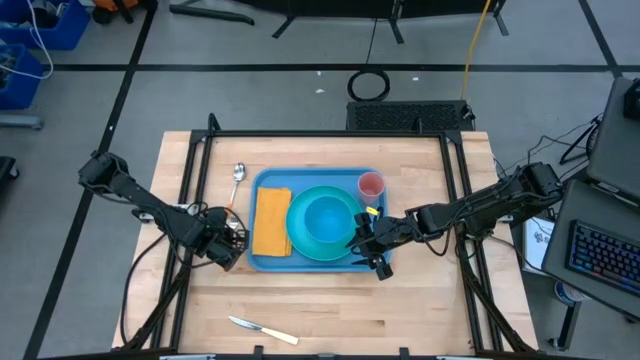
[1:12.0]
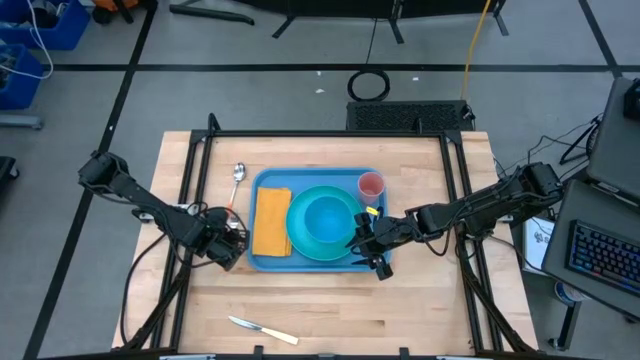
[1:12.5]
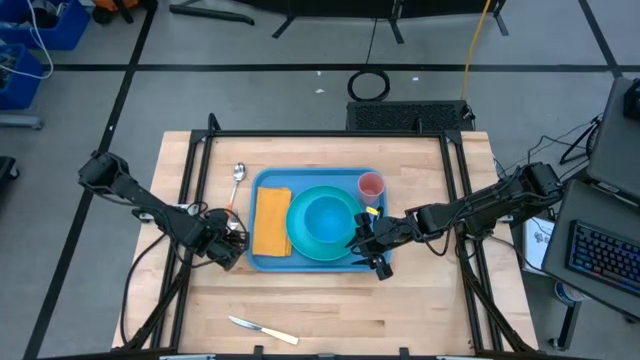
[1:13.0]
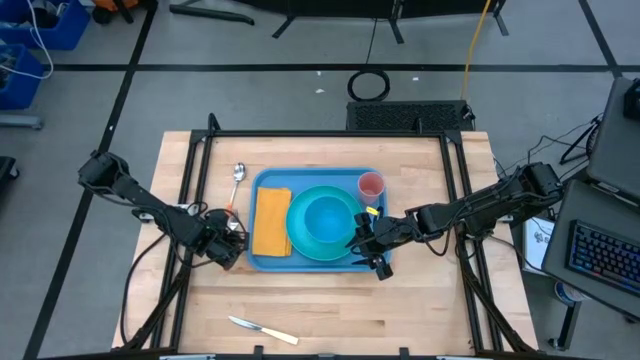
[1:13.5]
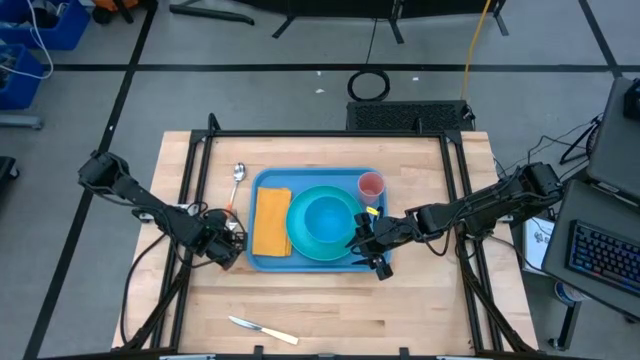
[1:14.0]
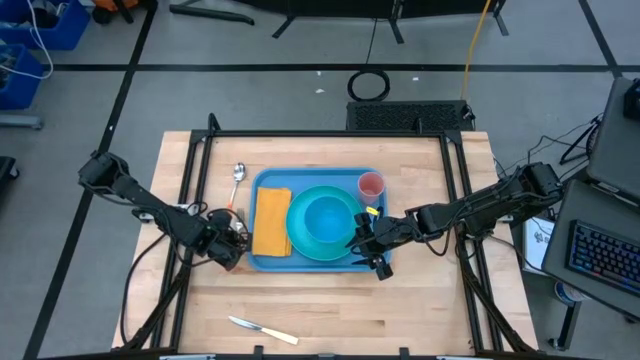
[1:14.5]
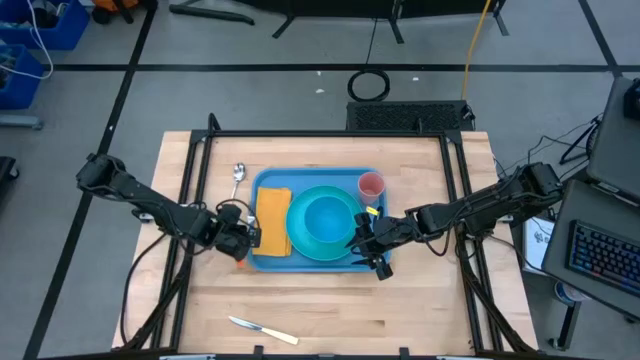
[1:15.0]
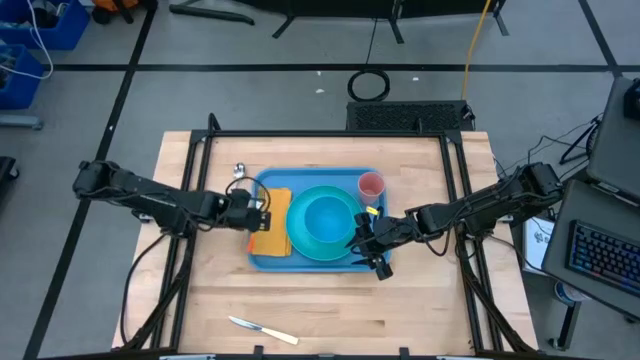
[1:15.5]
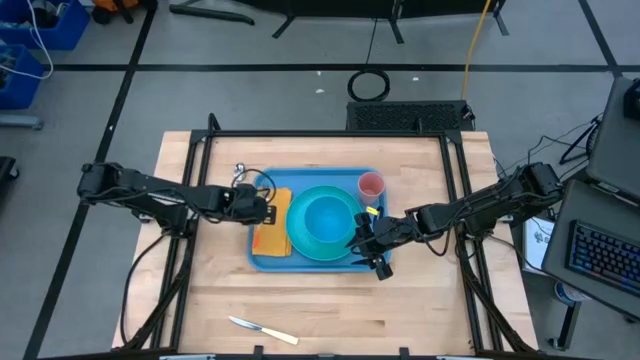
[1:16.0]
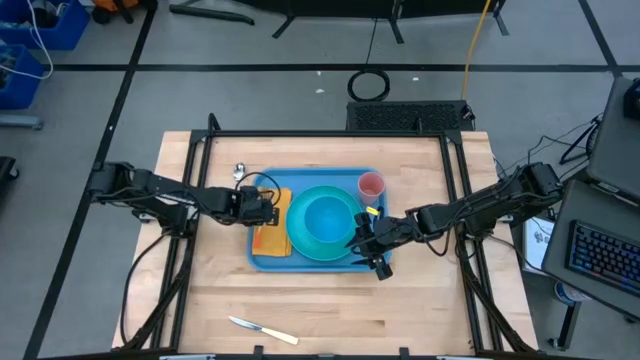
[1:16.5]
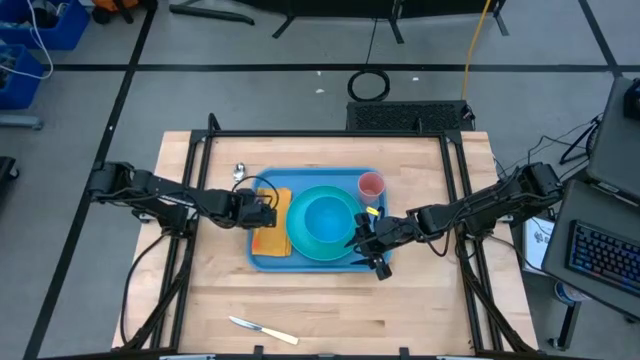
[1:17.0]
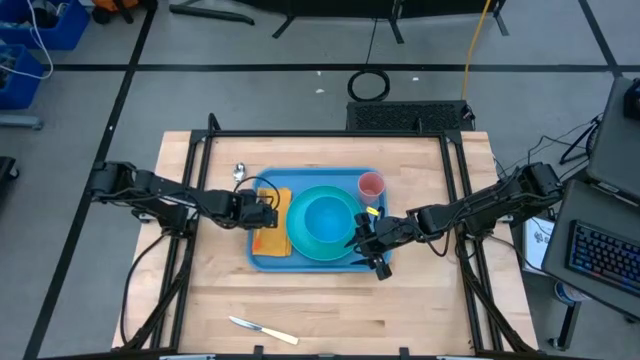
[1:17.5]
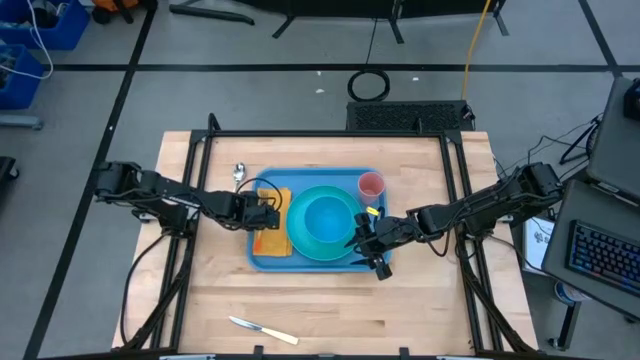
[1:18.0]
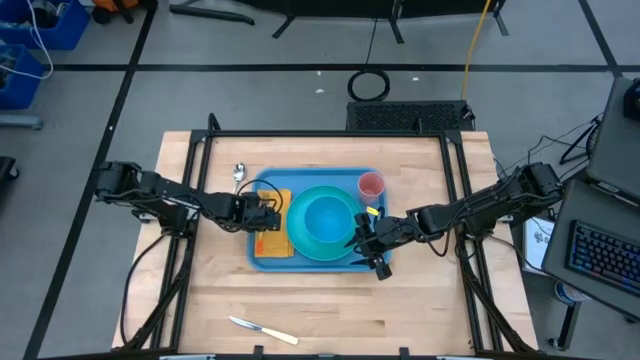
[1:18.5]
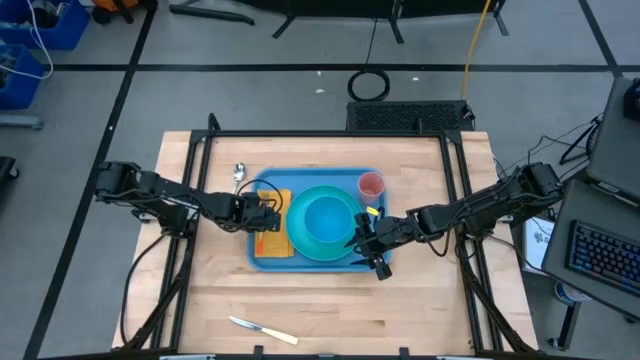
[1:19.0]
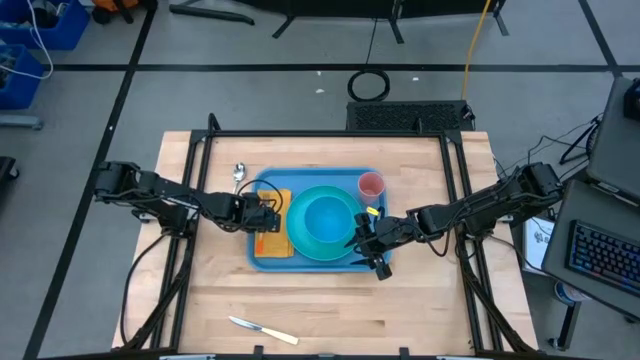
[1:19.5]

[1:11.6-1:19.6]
Task: Set up tray
Put the orange fork on the yellow napkin

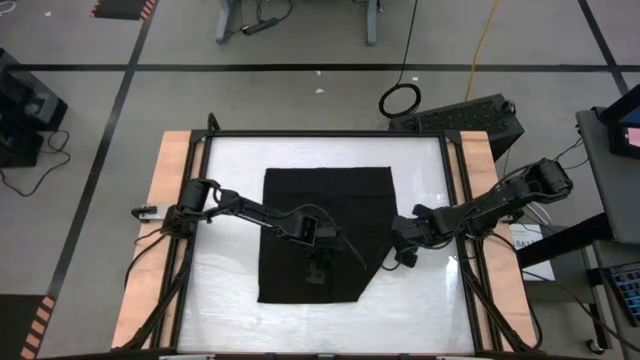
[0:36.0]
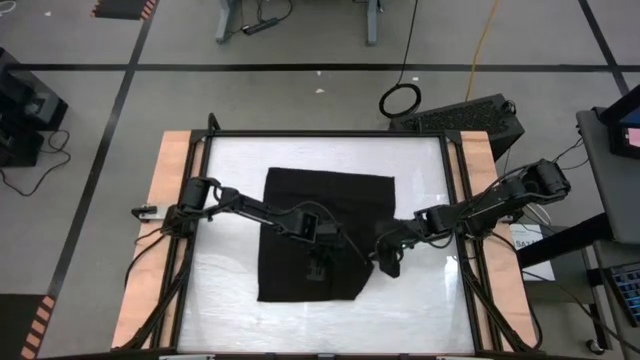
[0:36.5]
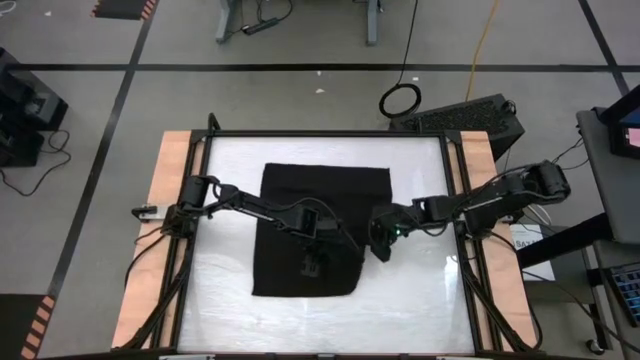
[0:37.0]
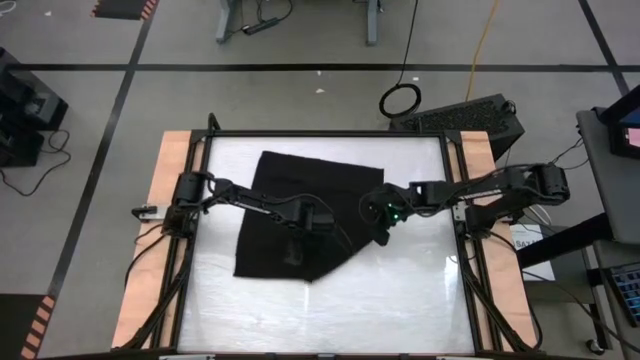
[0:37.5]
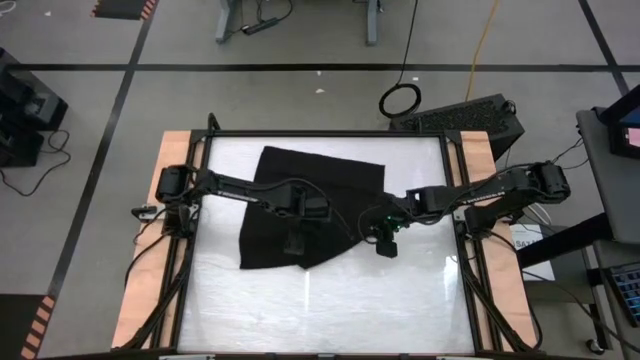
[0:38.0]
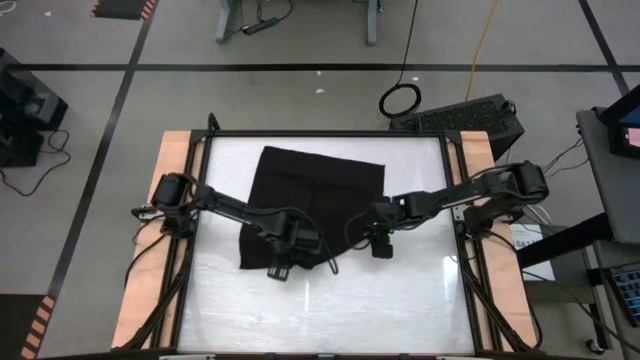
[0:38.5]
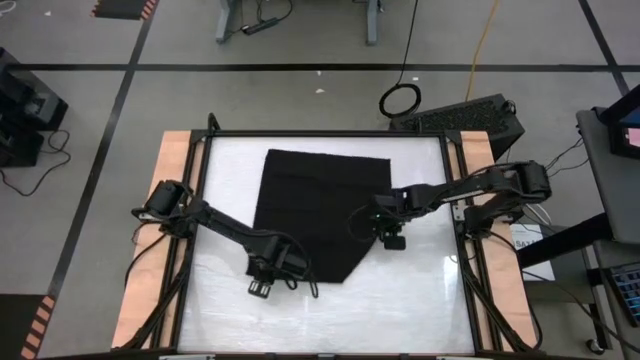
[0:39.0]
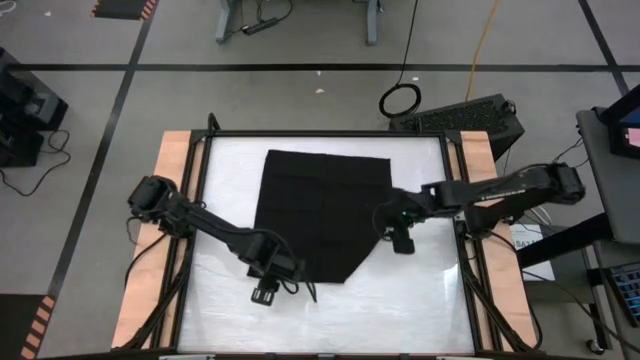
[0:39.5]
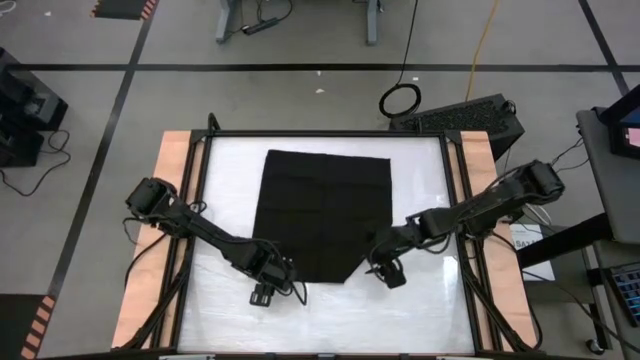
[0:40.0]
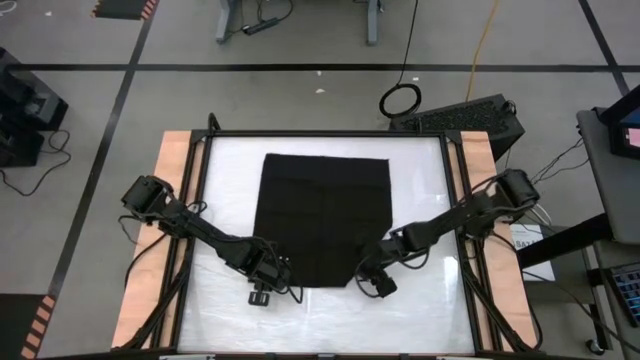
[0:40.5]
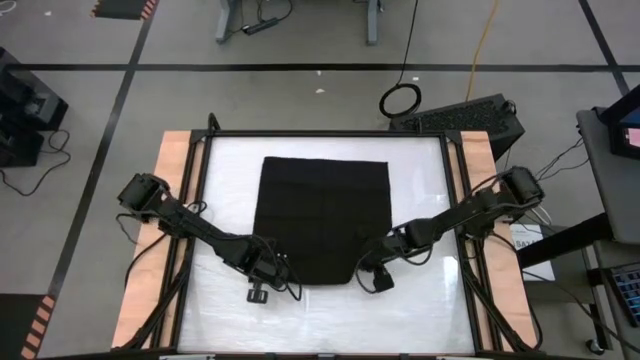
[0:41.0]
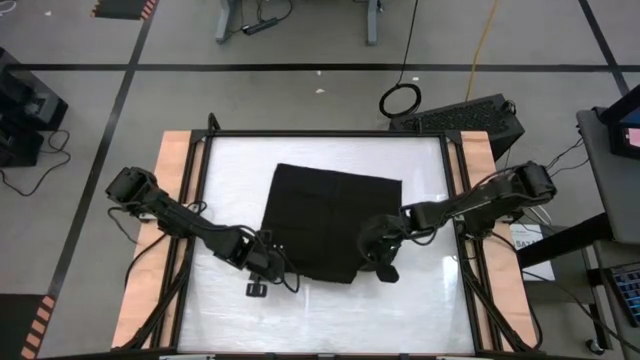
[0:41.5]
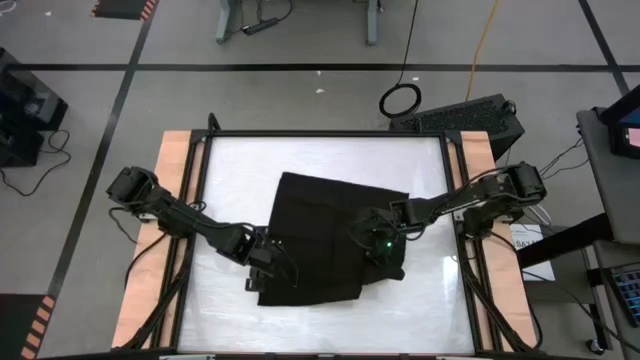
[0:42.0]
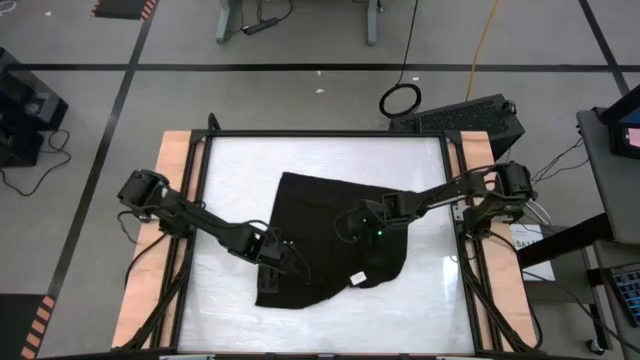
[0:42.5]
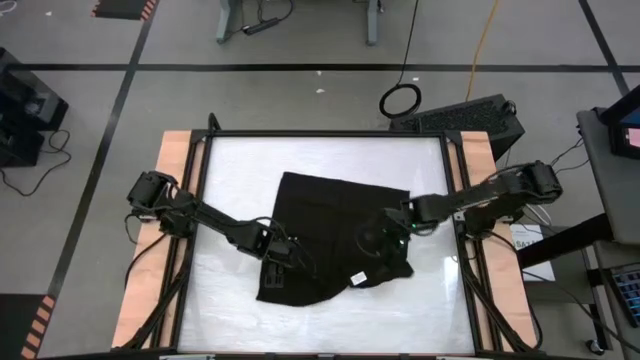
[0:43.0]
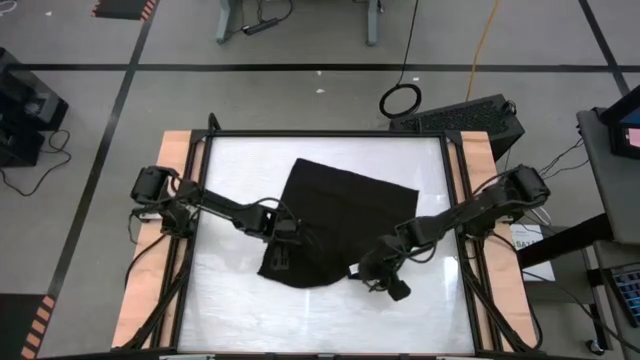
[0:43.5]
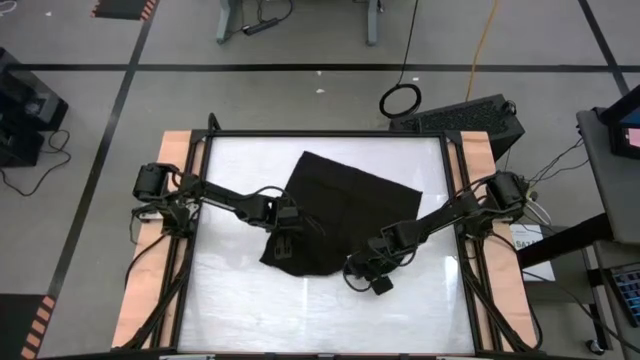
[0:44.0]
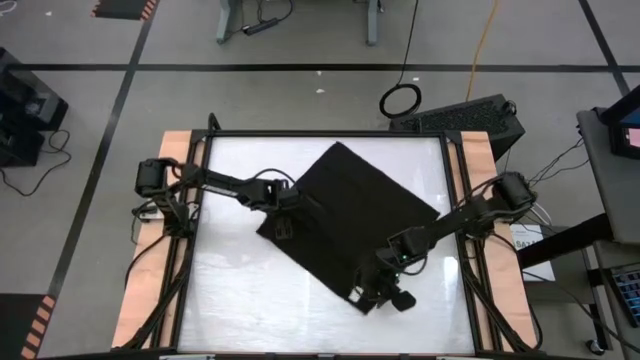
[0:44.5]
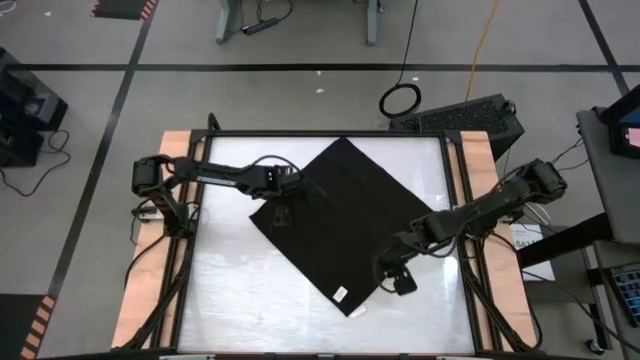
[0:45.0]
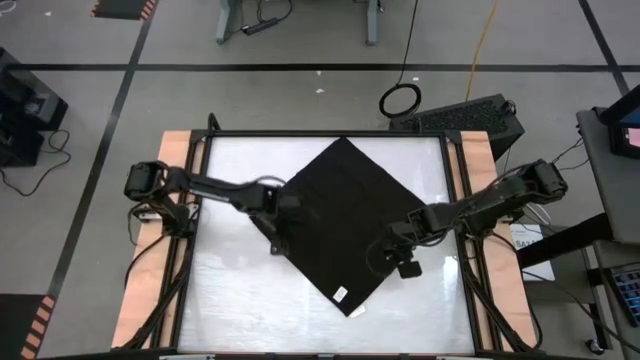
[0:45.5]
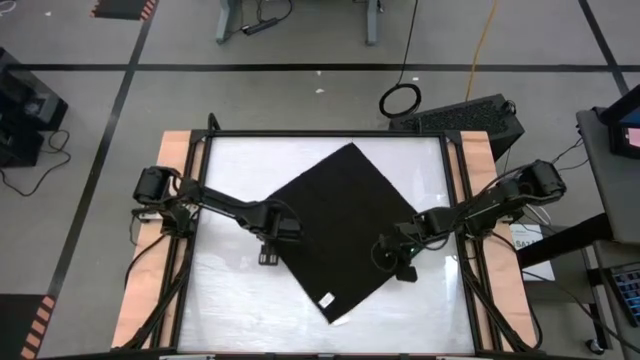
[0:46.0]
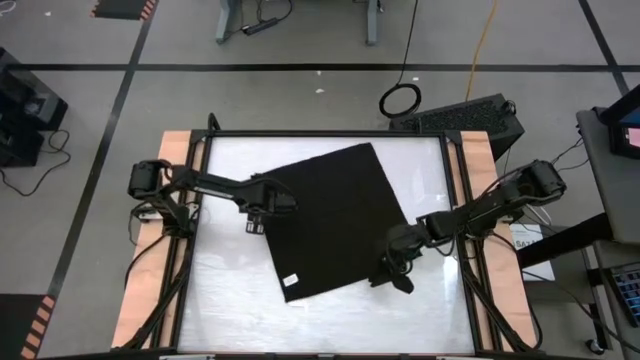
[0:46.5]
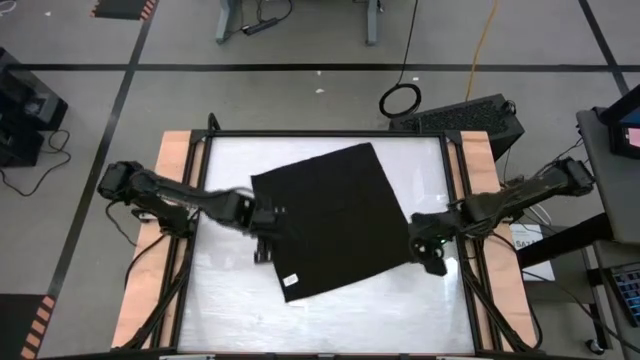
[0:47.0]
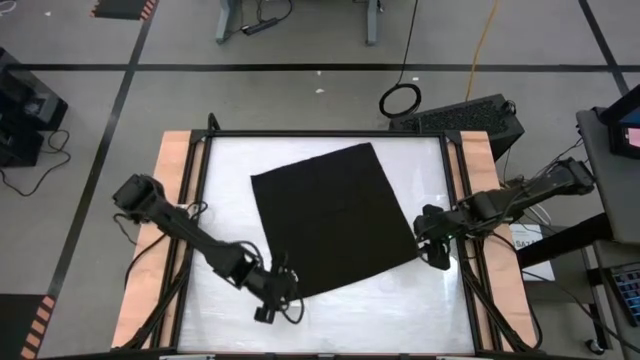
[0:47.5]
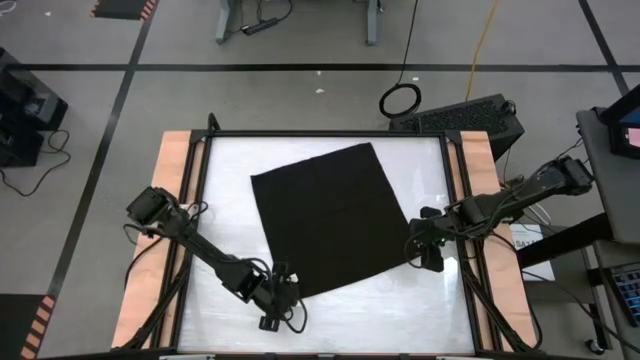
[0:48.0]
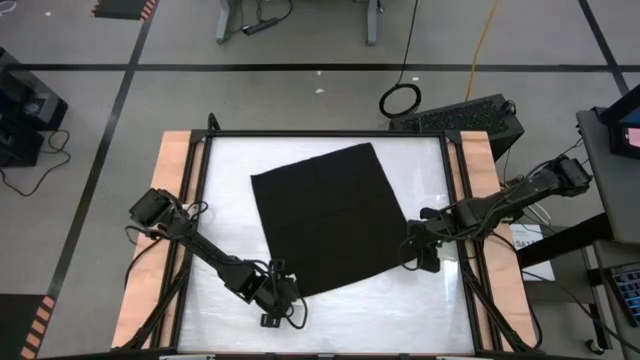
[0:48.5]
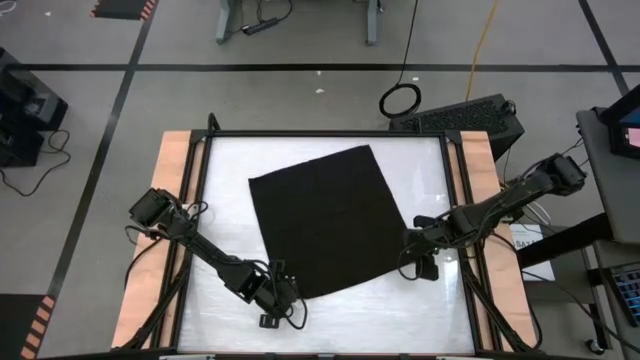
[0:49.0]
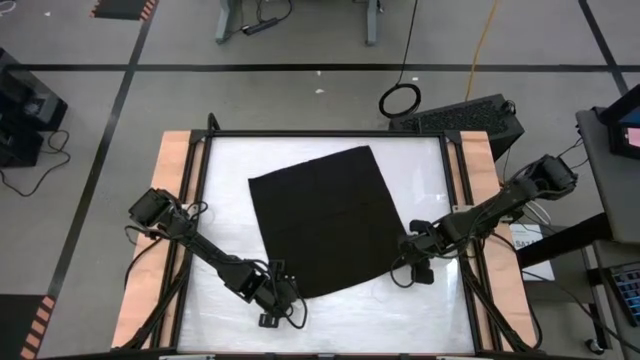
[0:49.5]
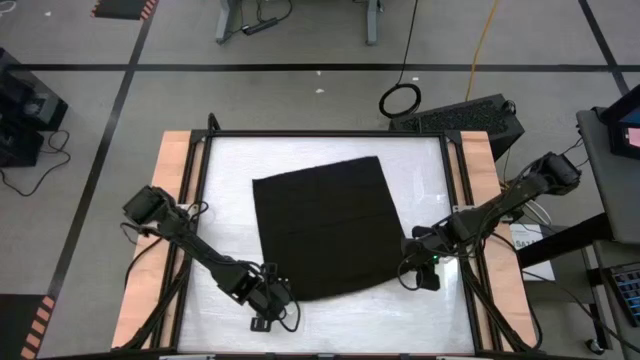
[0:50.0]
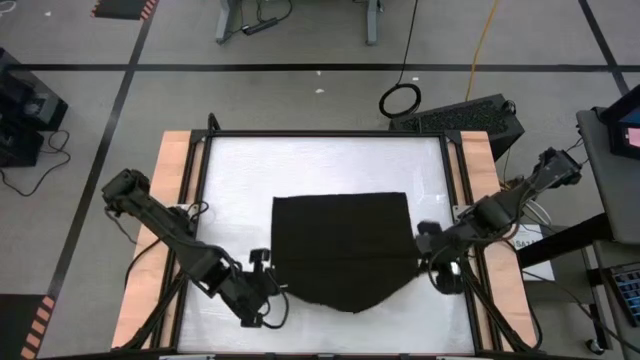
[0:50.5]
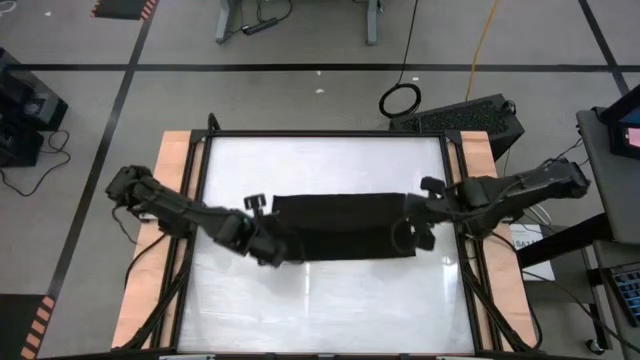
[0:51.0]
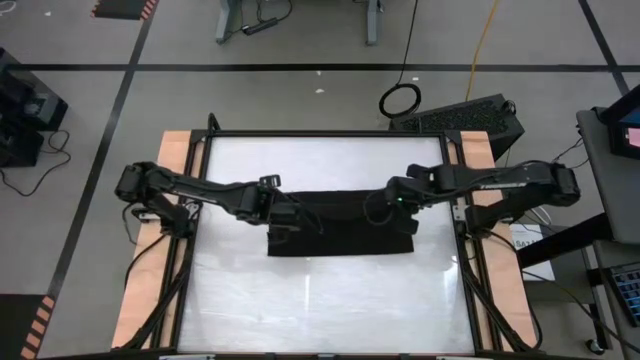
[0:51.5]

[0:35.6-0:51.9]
Task: Roll towel into tight, uniform cylinder
Fold the black towel
